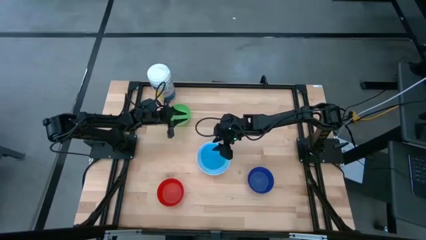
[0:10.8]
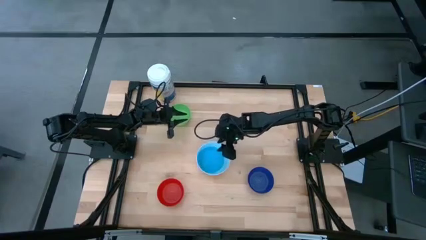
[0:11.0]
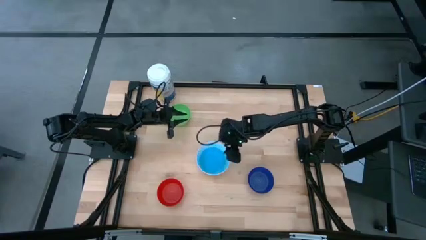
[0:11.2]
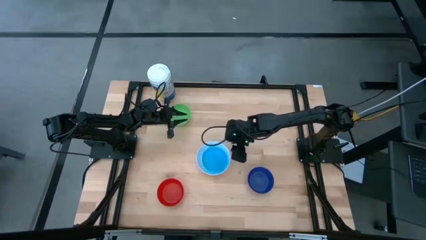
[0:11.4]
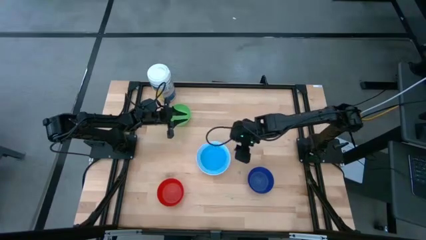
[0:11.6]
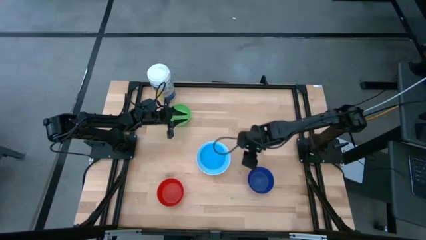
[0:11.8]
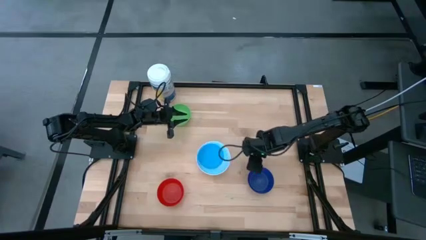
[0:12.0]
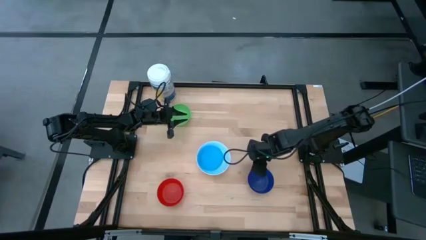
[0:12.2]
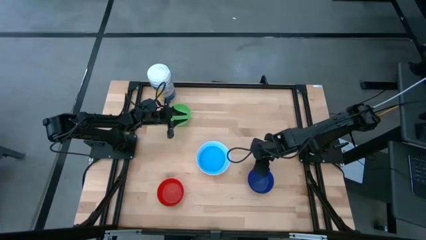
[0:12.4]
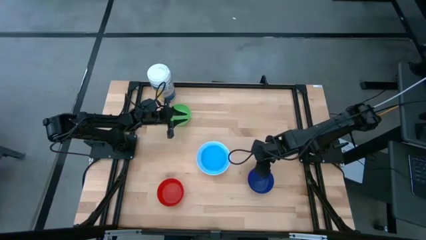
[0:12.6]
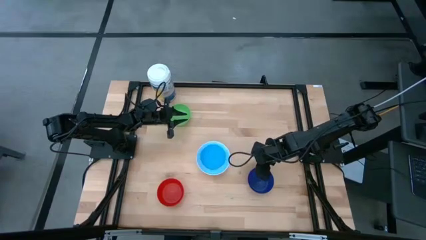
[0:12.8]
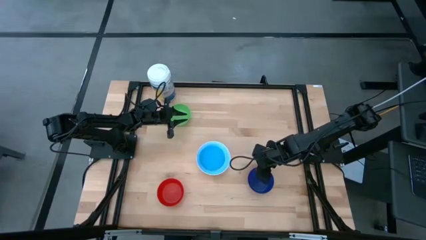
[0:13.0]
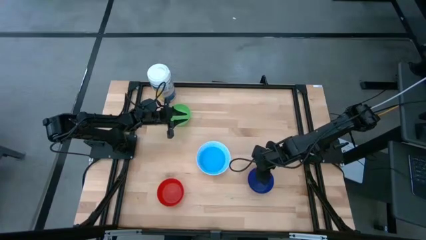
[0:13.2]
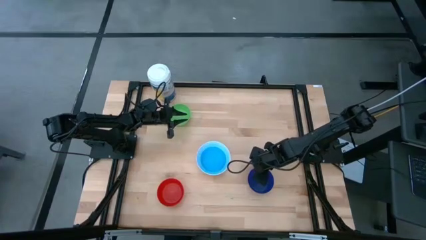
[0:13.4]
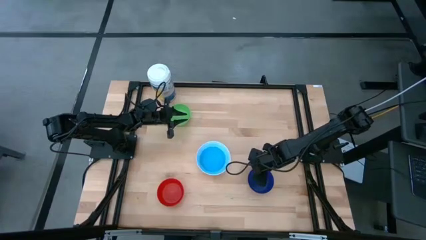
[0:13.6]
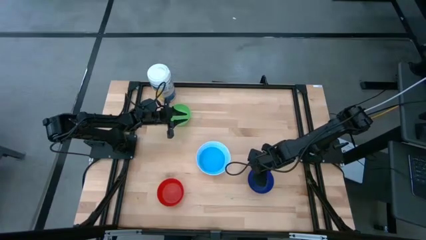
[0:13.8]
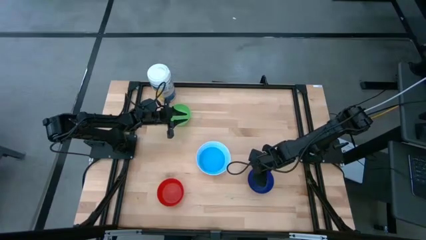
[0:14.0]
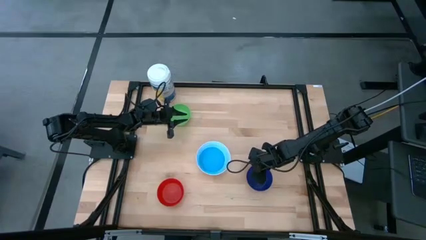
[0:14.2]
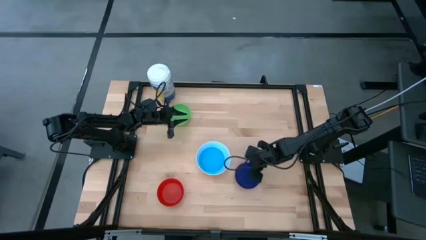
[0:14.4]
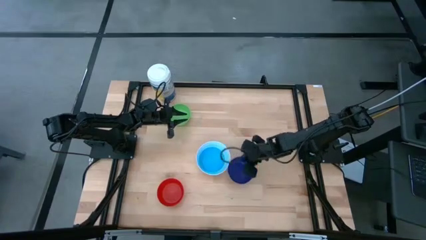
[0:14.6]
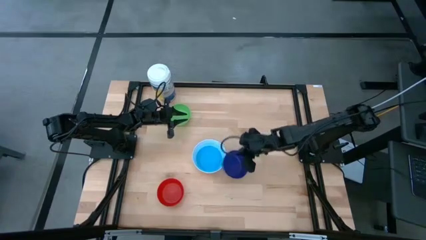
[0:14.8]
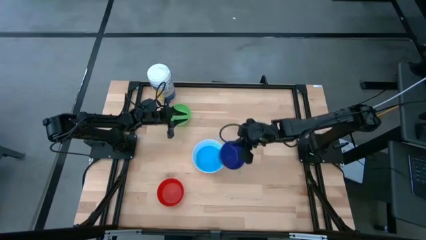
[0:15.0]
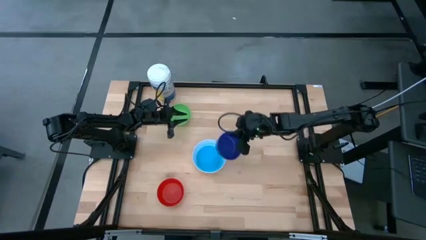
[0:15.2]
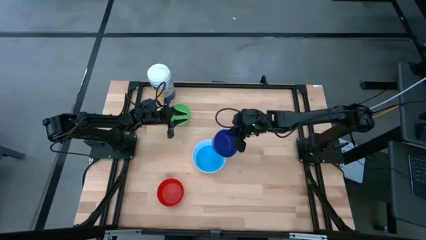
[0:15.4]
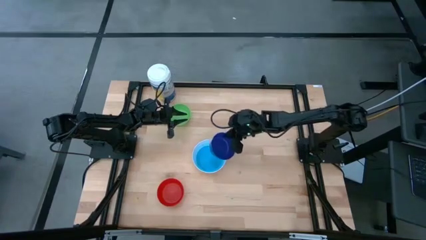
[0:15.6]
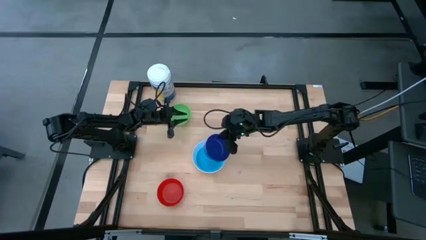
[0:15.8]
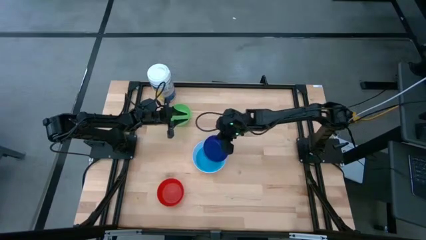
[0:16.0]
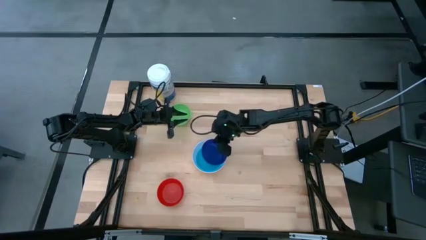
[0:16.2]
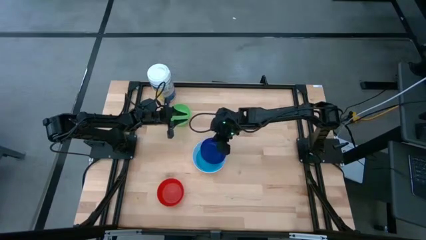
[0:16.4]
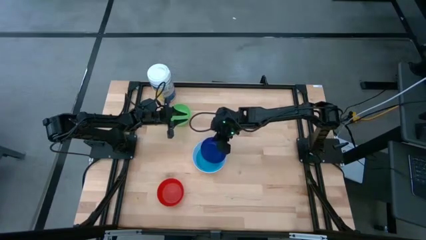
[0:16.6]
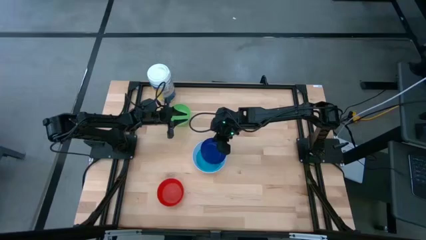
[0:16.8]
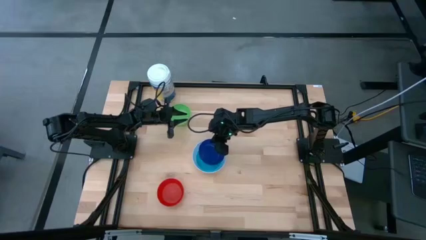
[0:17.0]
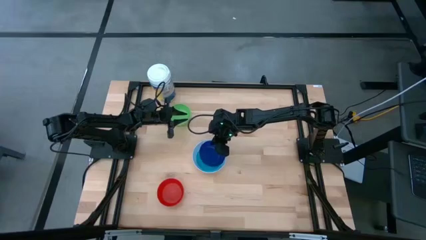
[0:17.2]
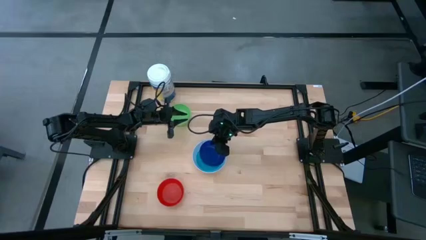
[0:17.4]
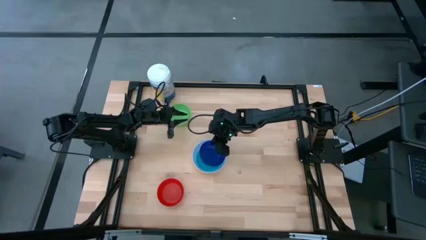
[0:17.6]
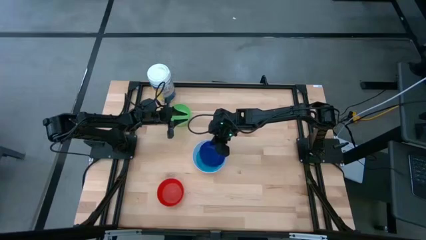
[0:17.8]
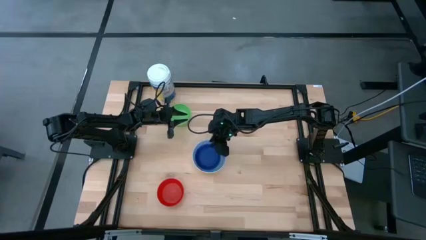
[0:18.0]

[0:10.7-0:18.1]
Stack the blue bowl on the light blue bowl

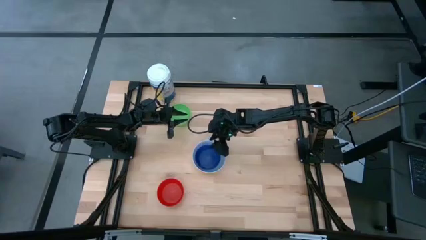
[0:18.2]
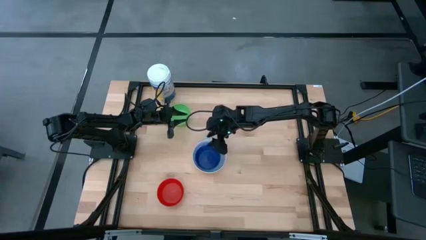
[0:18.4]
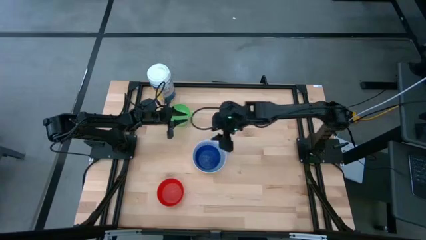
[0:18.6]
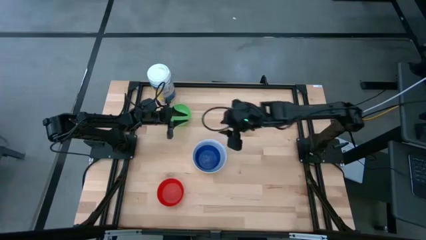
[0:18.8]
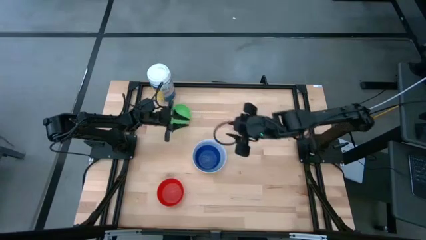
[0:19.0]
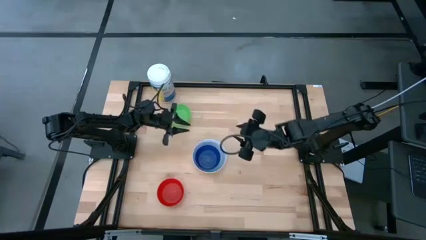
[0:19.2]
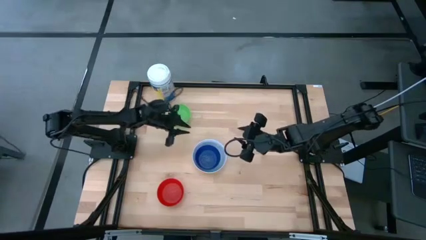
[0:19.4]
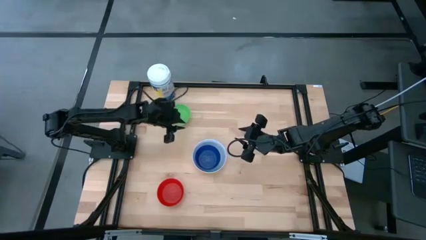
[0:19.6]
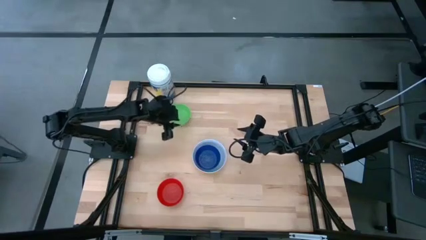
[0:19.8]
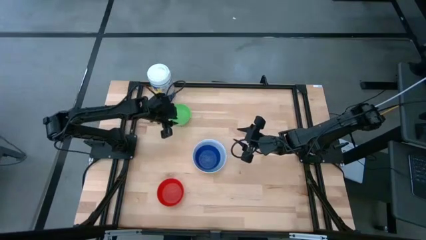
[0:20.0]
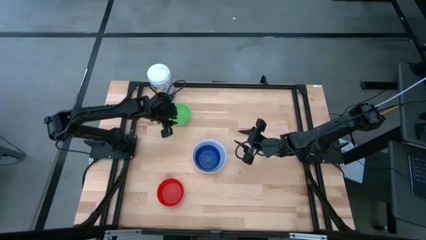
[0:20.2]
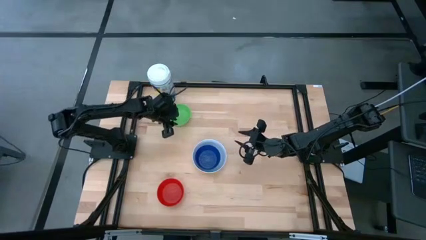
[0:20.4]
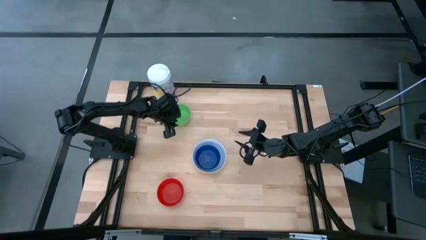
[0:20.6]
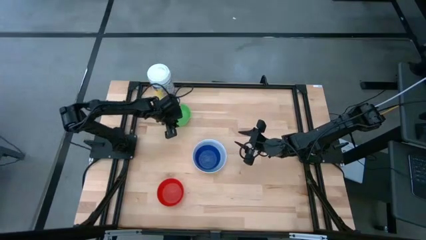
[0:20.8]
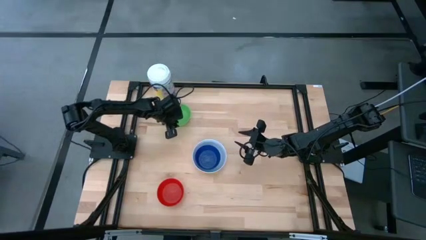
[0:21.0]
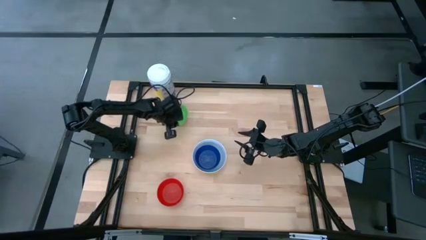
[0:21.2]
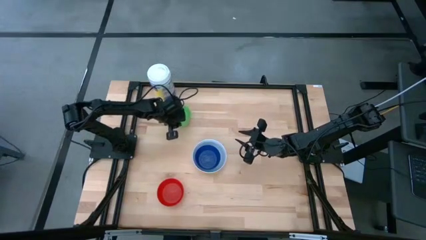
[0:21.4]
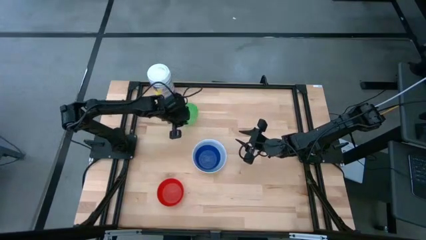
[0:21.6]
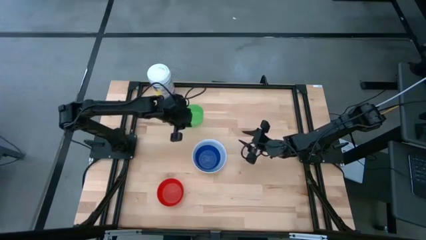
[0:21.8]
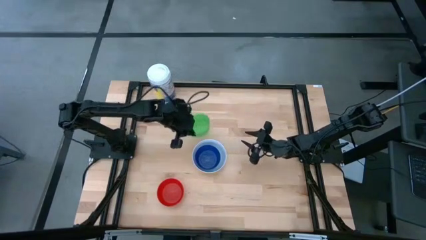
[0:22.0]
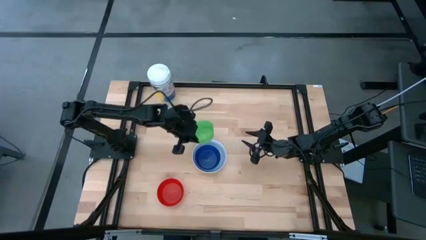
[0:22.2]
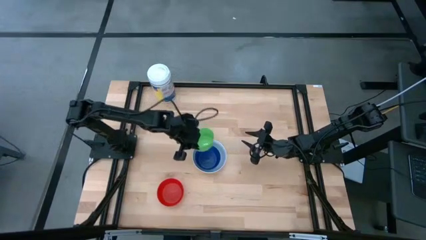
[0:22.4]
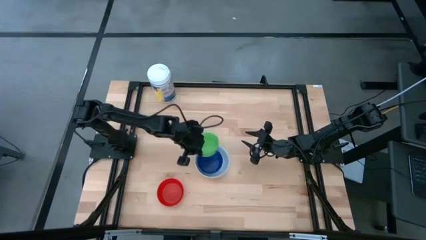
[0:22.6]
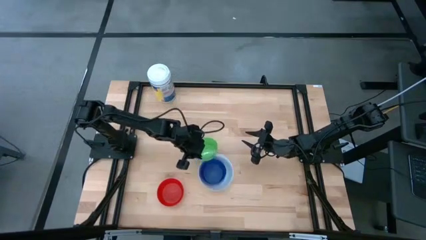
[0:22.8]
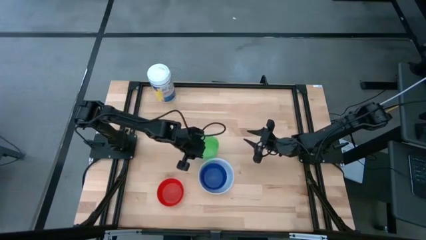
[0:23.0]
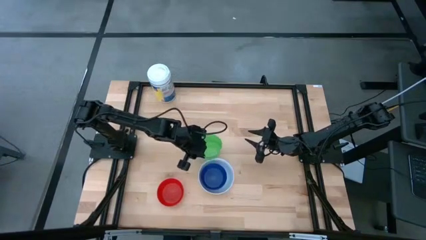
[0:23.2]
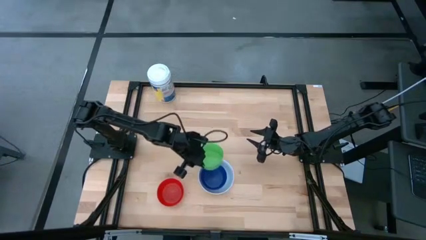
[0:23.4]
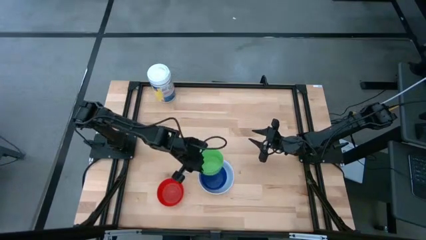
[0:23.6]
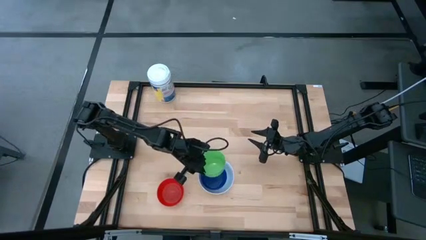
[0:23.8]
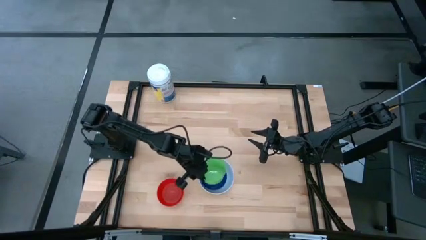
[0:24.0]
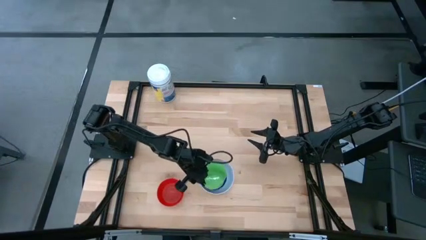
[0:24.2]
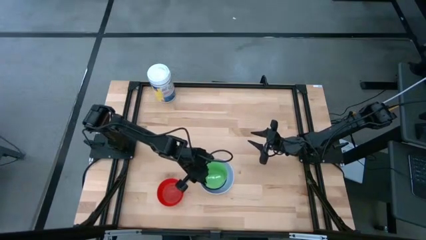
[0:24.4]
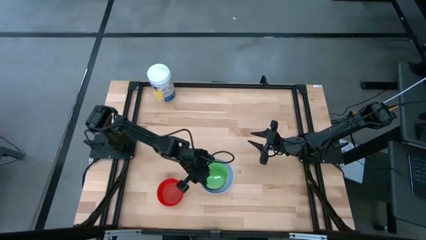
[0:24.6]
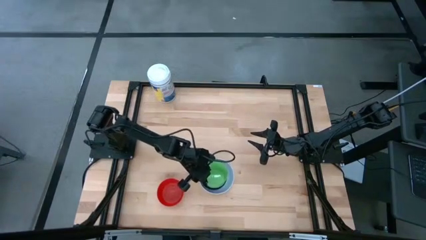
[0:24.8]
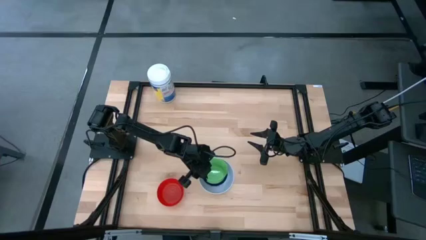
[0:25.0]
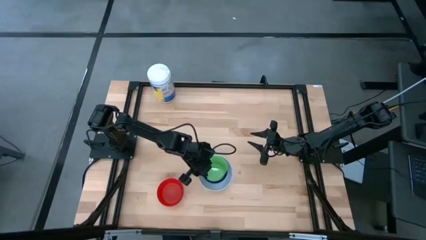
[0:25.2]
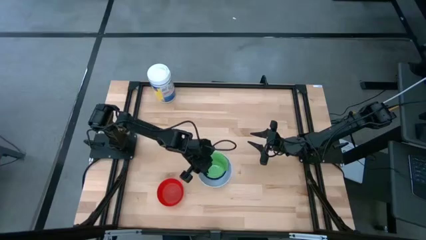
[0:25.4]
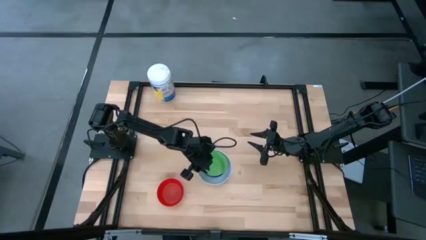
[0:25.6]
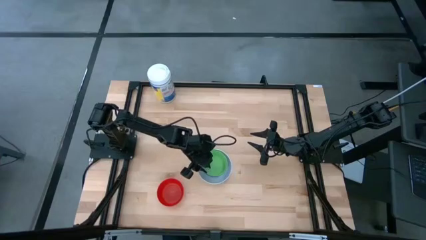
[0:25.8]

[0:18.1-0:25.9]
Stack the green bowl on the blue bowl
